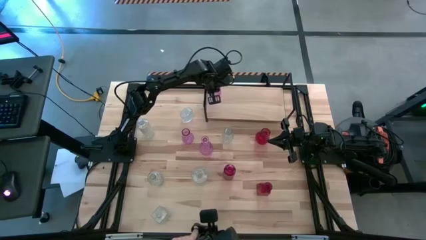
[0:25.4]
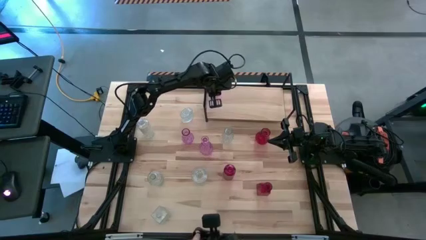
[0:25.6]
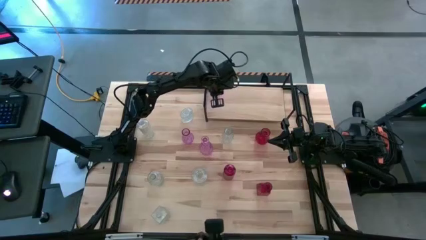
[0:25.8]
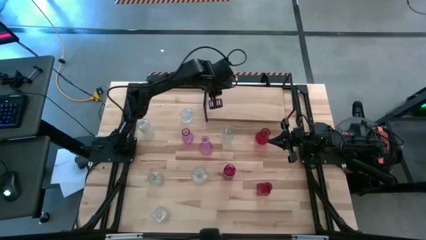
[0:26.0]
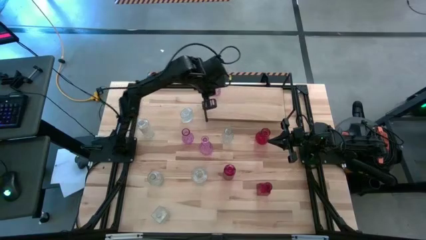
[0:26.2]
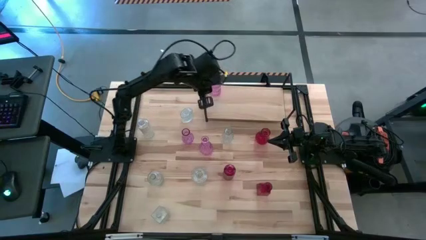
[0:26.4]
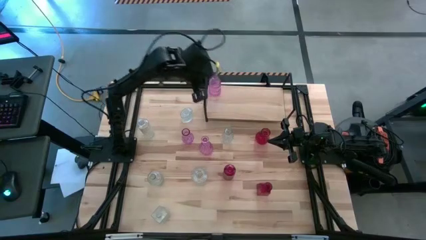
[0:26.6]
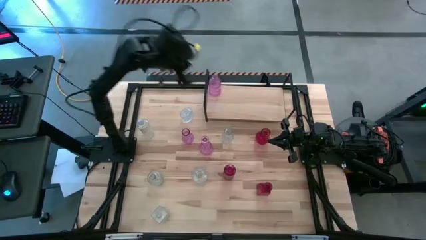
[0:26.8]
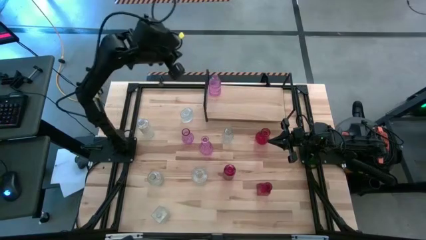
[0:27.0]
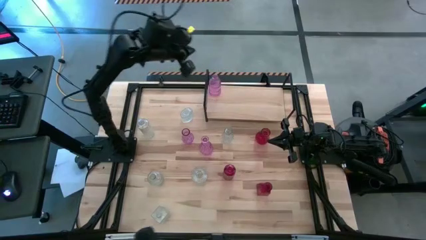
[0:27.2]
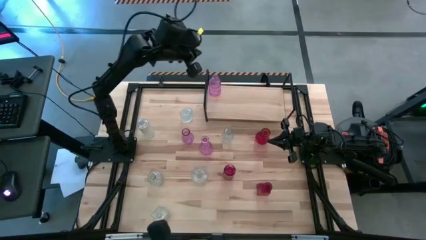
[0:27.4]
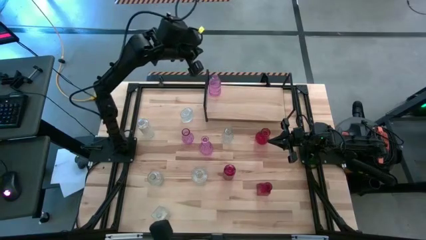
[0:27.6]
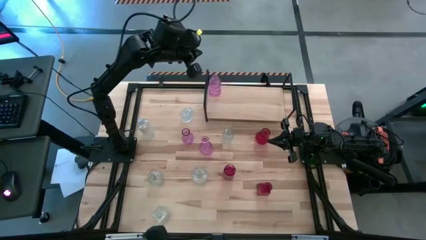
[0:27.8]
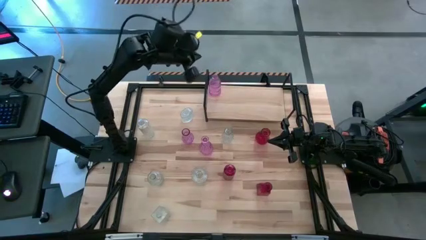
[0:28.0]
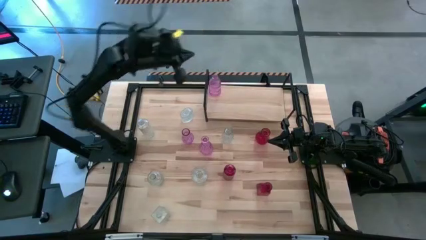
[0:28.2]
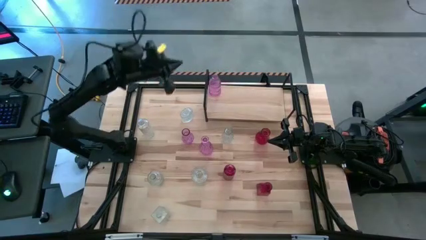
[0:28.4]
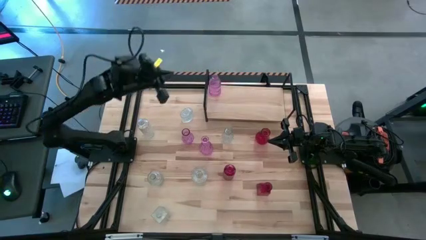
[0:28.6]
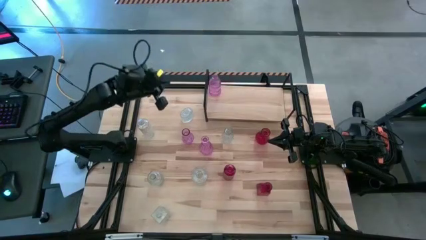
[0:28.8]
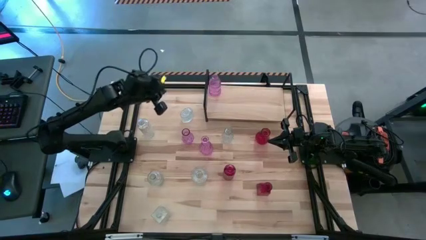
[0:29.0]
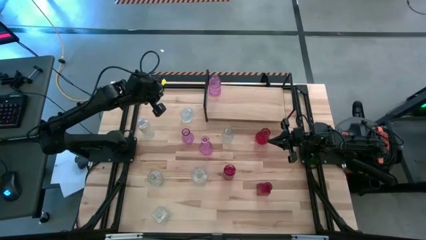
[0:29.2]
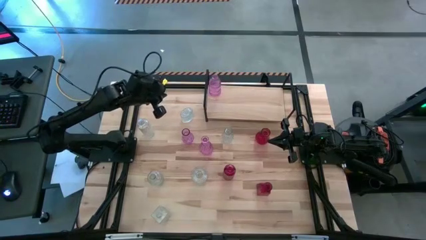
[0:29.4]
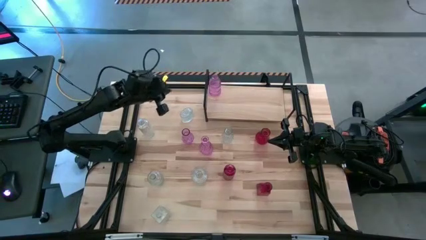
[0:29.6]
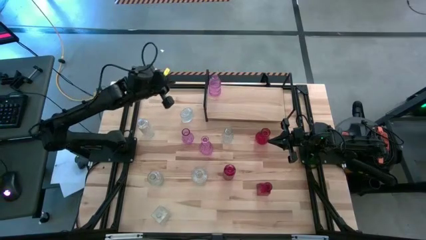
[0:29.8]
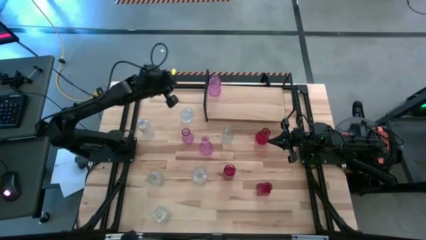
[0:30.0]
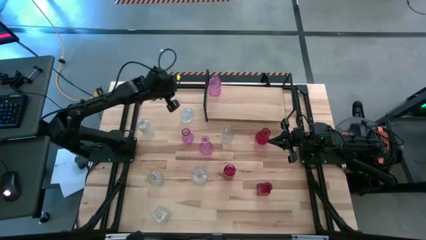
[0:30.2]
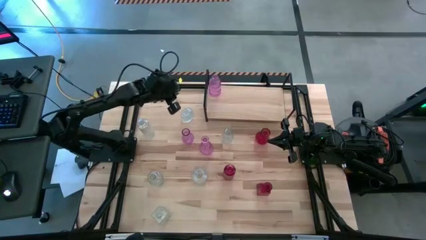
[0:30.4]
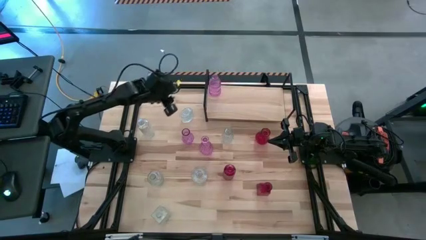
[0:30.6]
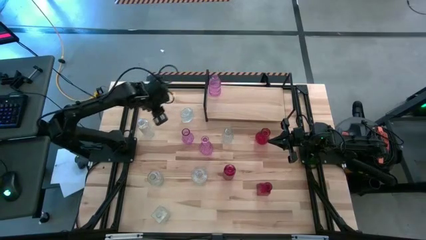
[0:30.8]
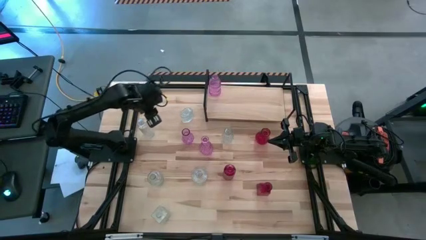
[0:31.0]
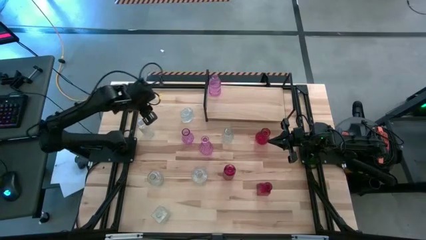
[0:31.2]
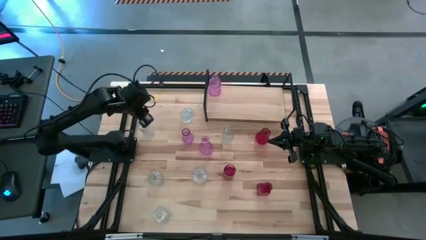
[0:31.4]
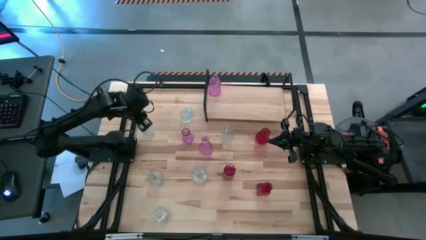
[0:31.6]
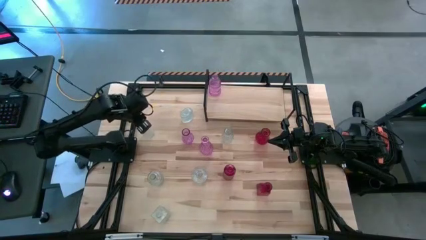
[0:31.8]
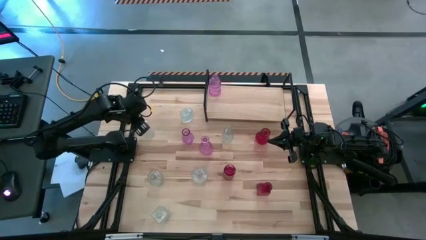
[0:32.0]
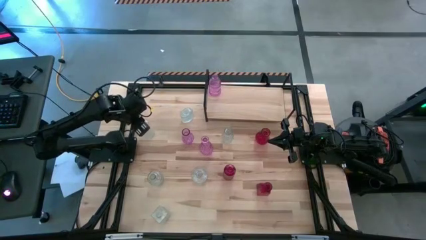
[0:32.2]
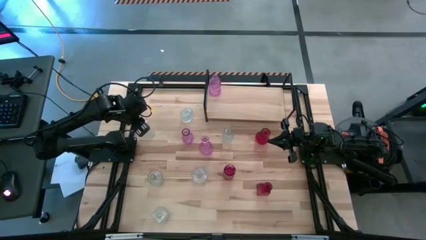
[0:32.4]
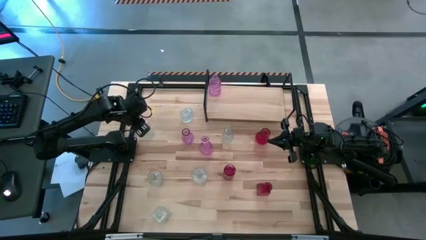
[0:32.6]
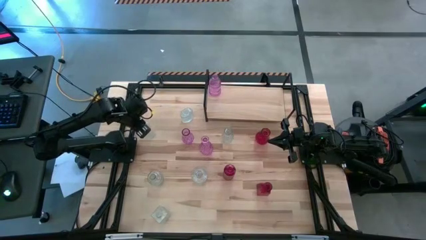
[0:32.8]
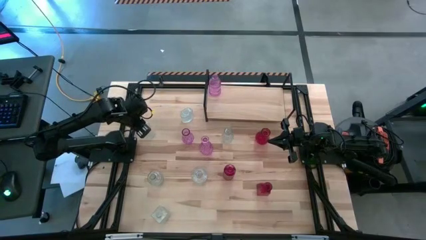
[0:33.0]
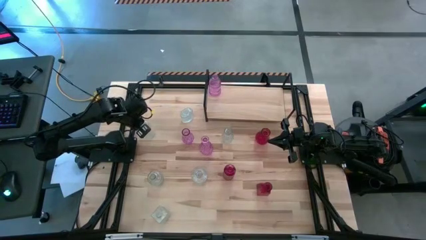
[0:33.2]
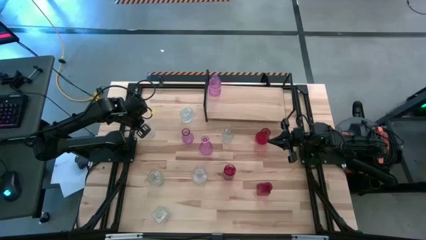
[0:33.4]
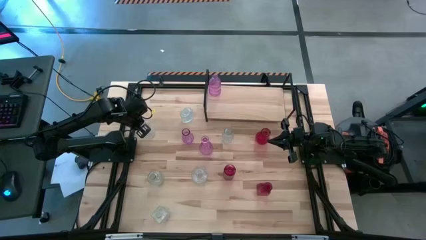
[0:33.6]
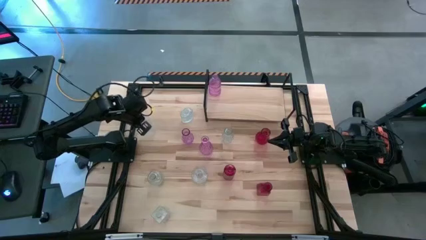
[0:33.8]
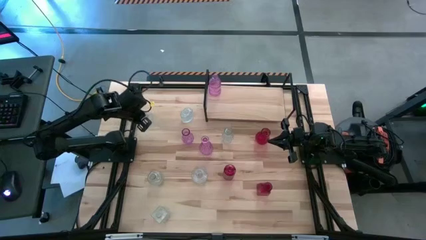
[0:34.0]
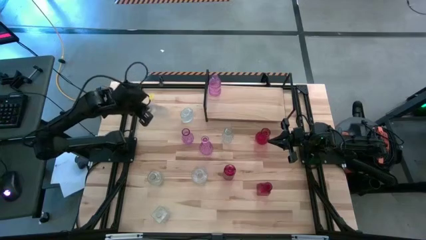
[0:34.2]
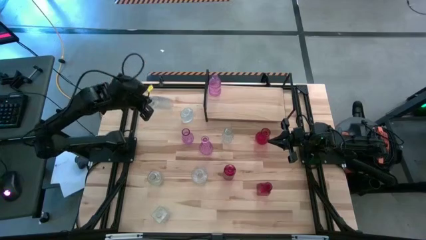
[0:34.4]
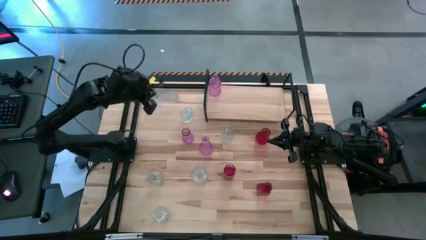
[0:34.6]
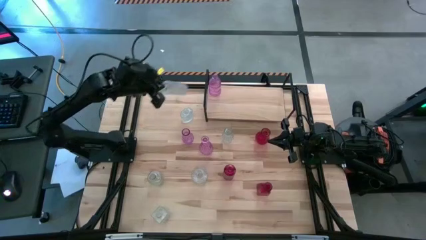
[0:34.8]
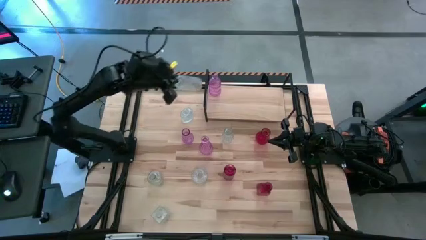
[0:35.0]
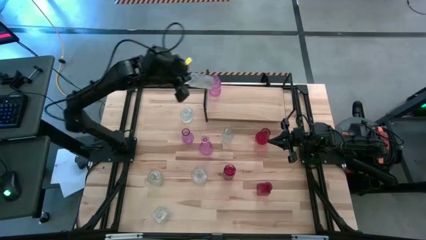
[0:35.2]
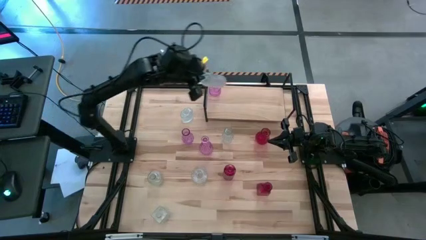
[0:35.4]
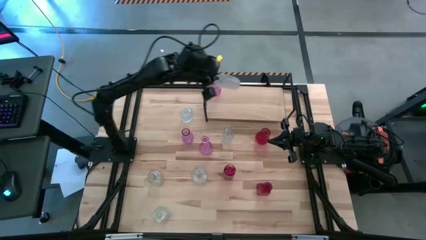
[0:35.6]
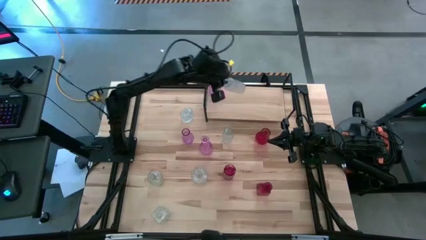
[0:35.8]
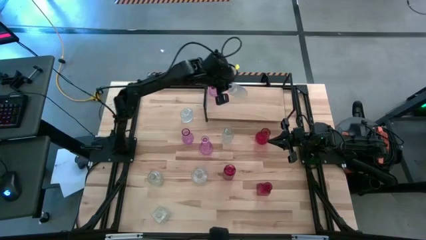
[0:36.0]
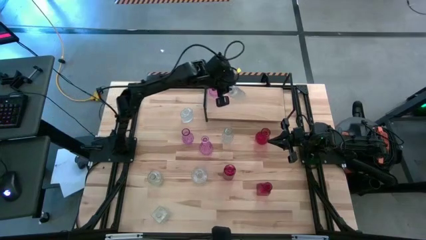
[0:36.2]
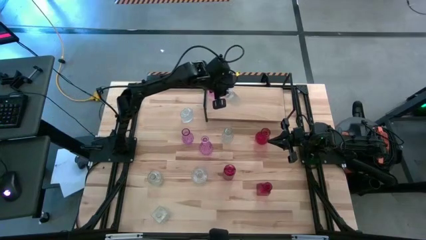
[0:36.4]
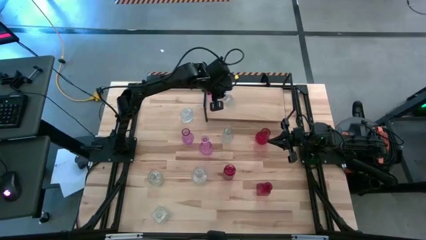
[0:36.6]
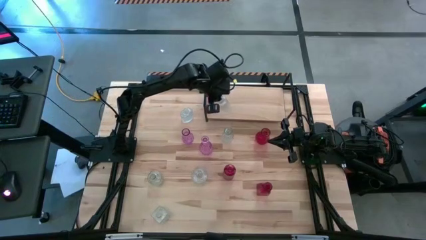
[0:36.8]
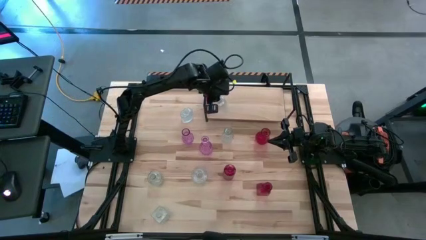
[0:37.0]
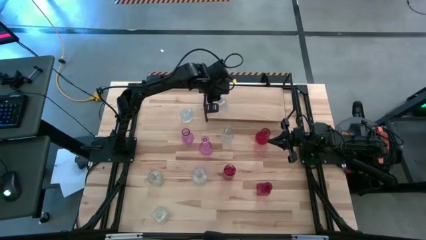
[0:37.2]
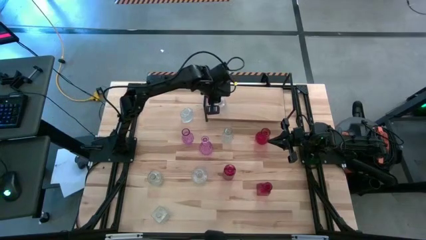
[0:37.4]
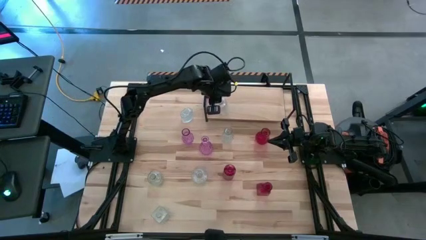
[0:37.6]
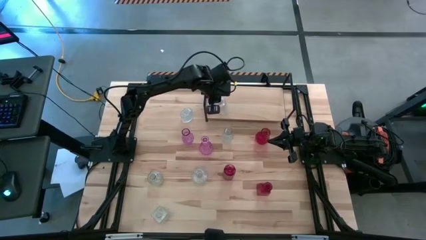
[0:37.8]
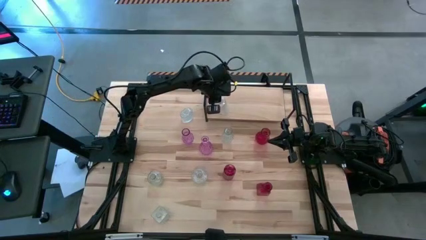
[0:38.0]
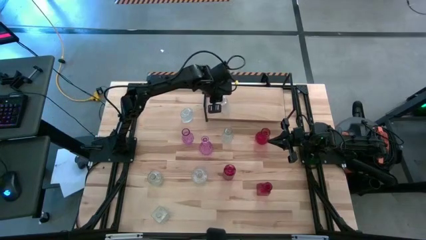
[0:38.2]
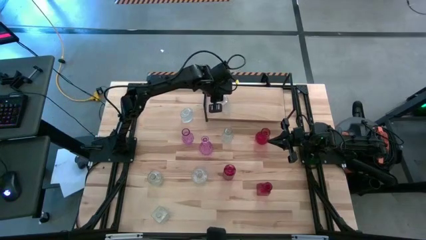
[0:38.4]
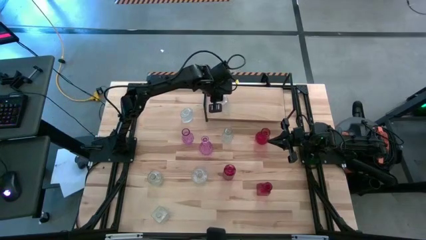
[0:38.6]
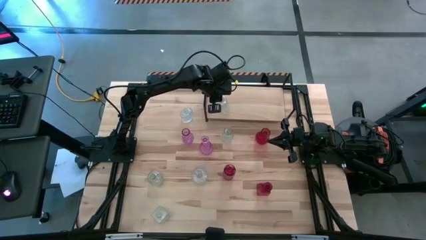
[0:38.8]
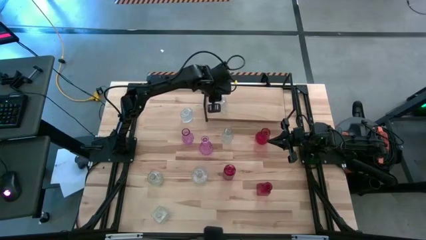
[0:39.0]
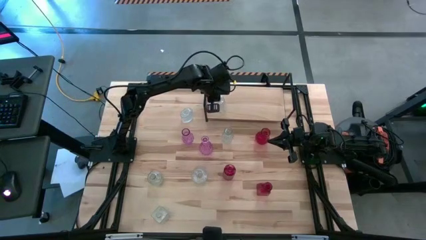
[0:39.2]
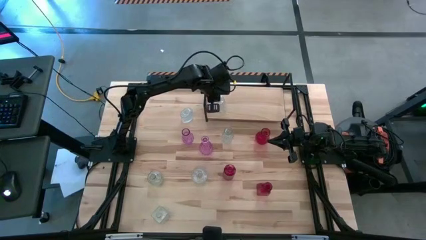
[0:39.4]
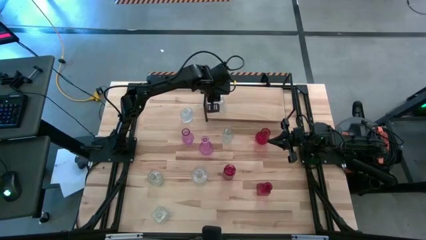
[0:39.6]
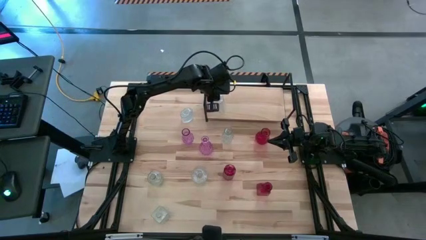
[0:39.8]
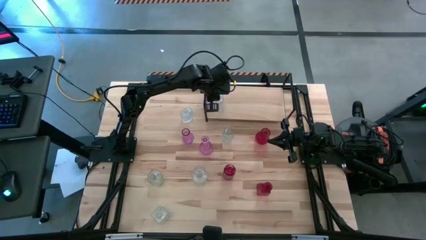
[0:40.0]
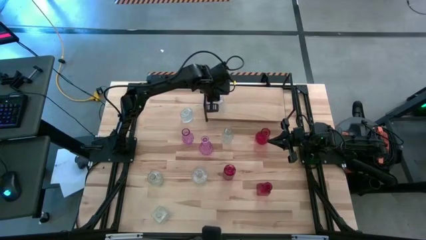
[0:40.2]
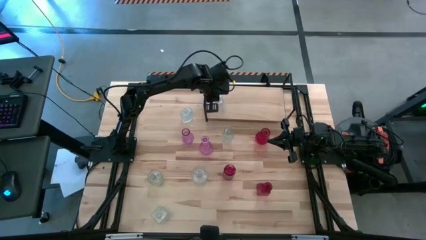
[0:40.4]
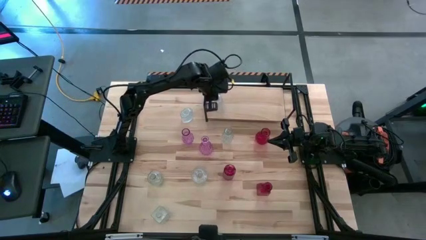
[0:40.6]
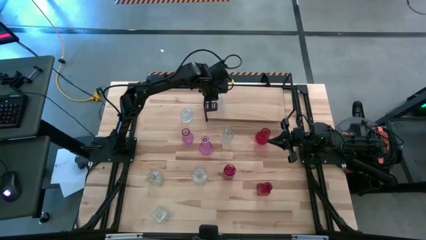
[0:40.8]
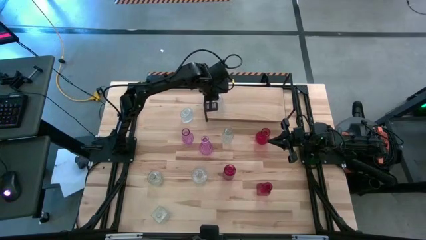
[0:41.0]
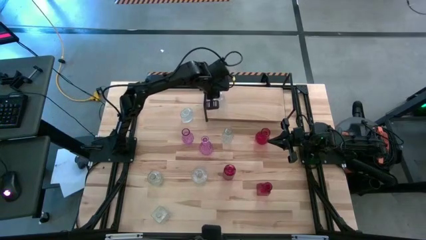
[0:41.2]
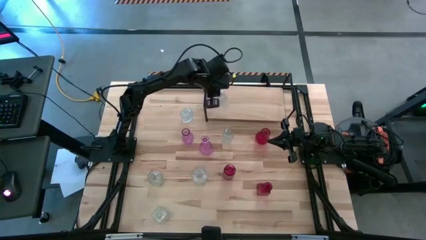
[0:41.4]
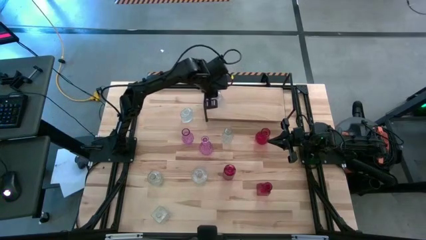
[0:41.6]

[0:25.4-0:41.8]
Task: sort vases onto shelf
Put the transparent vase on the shelf
